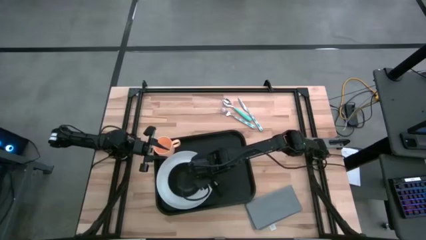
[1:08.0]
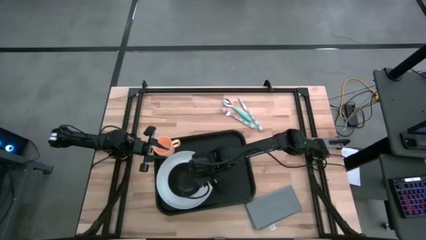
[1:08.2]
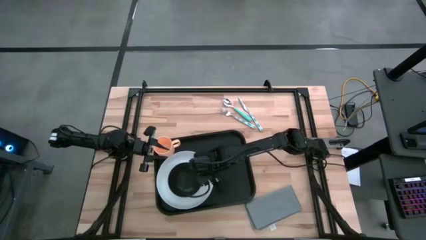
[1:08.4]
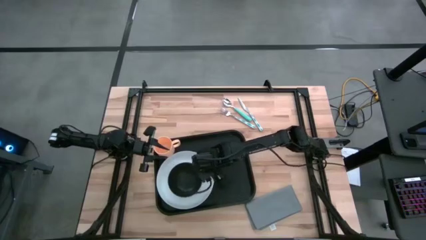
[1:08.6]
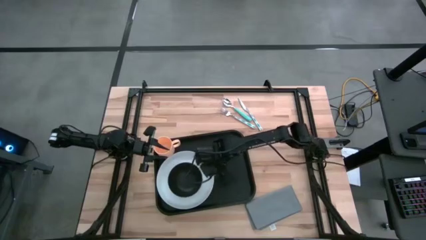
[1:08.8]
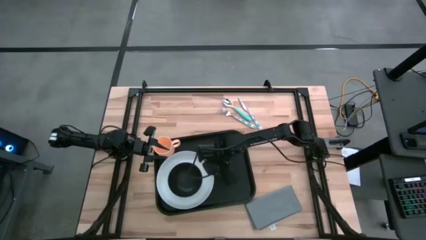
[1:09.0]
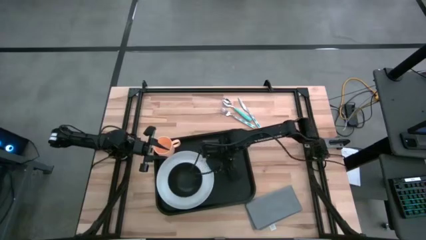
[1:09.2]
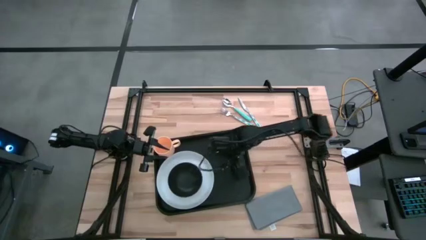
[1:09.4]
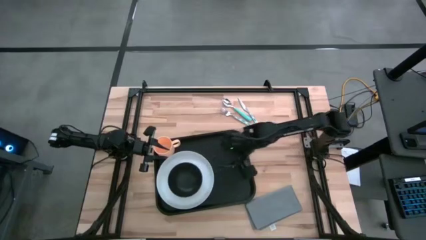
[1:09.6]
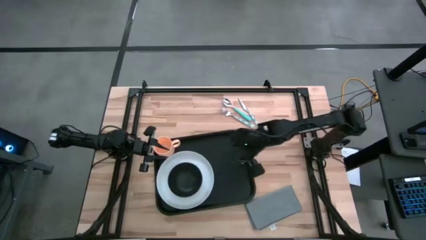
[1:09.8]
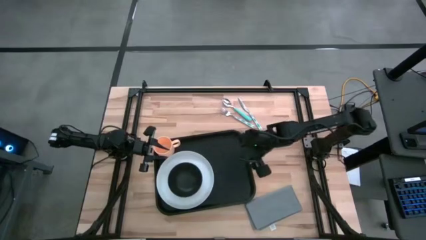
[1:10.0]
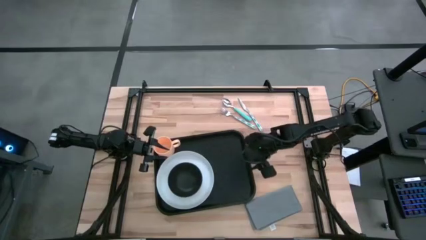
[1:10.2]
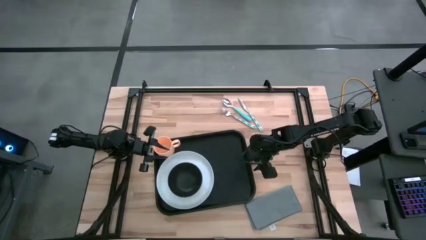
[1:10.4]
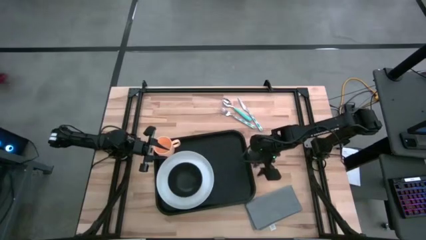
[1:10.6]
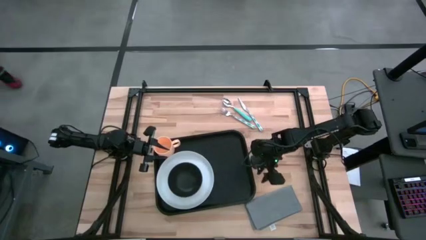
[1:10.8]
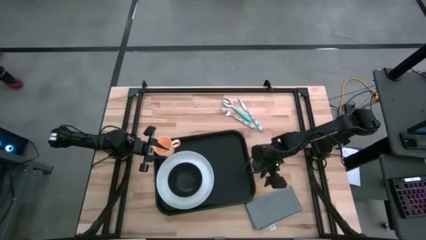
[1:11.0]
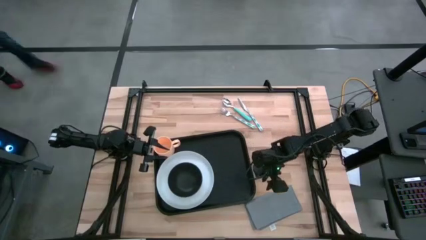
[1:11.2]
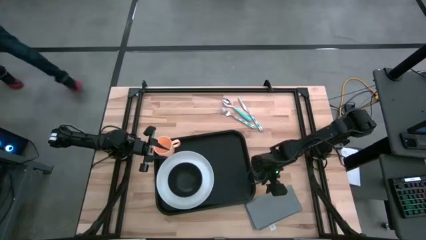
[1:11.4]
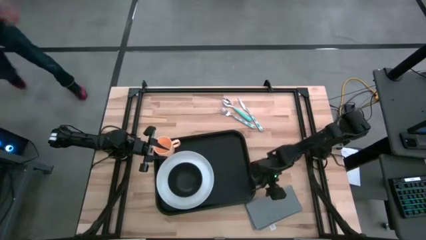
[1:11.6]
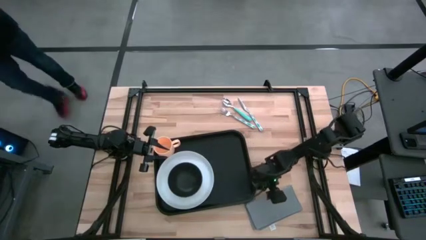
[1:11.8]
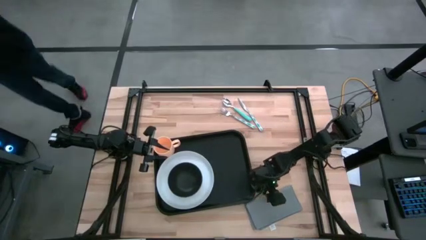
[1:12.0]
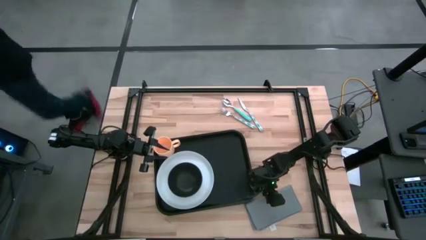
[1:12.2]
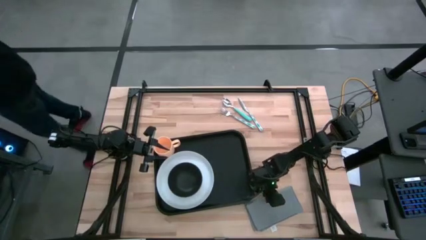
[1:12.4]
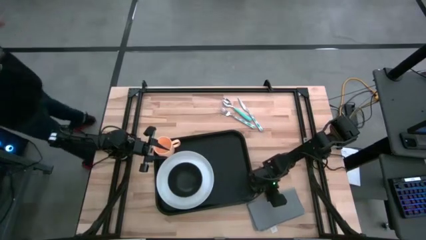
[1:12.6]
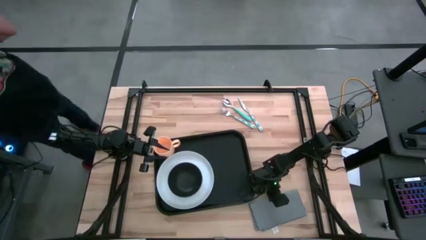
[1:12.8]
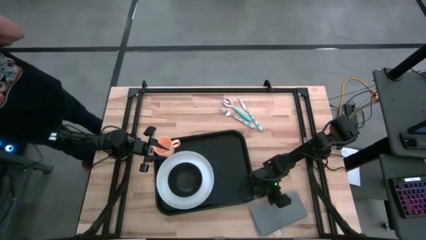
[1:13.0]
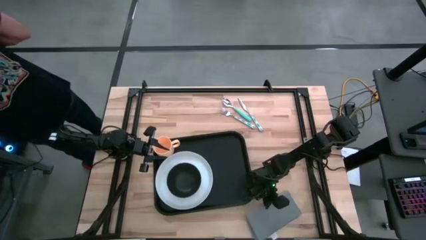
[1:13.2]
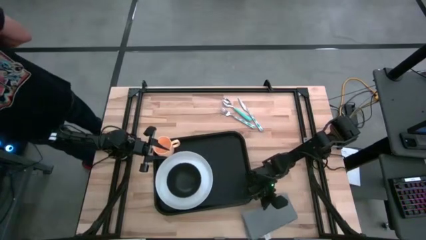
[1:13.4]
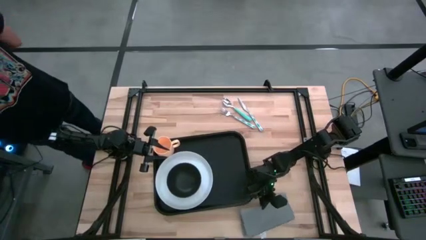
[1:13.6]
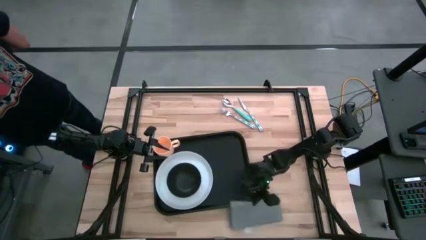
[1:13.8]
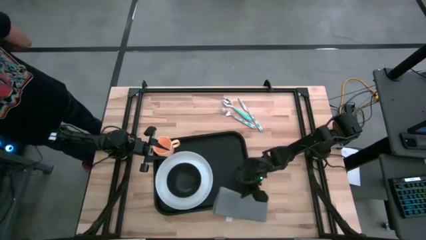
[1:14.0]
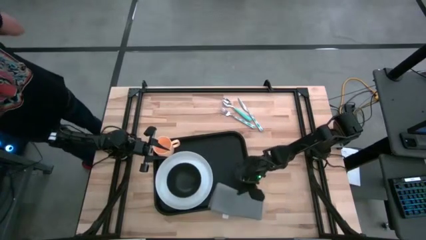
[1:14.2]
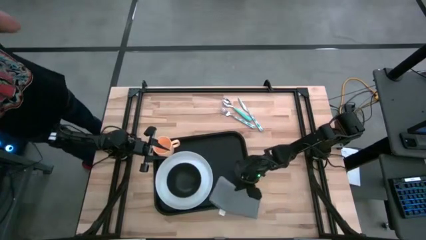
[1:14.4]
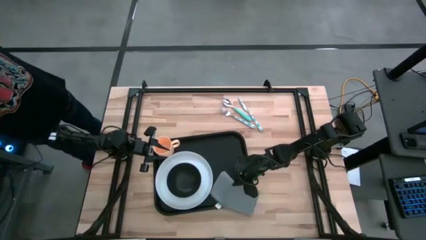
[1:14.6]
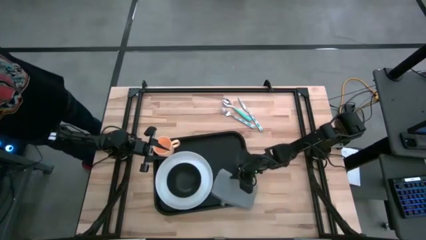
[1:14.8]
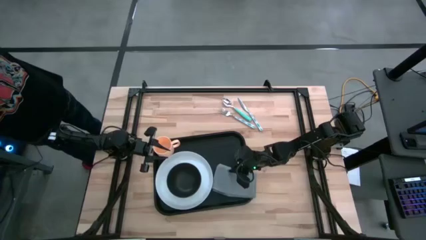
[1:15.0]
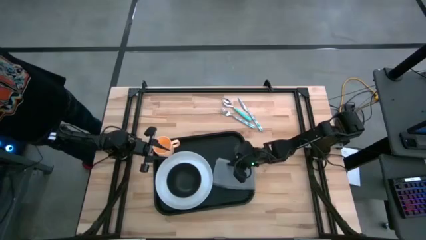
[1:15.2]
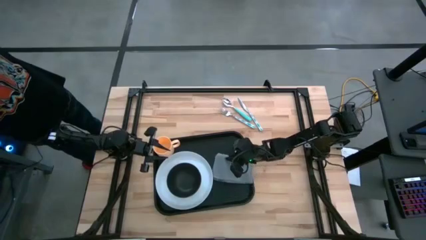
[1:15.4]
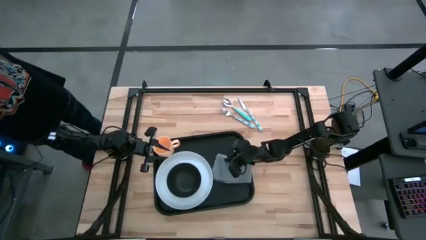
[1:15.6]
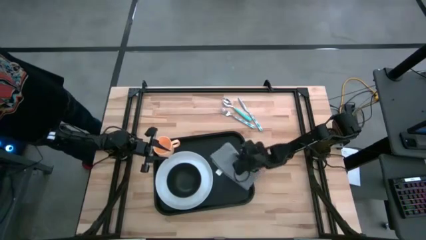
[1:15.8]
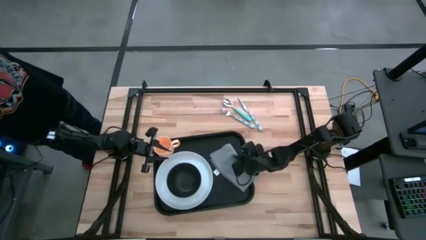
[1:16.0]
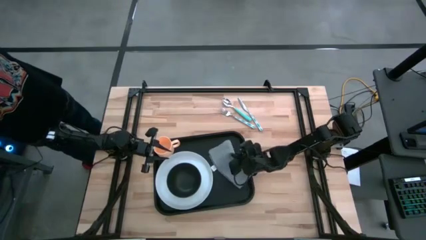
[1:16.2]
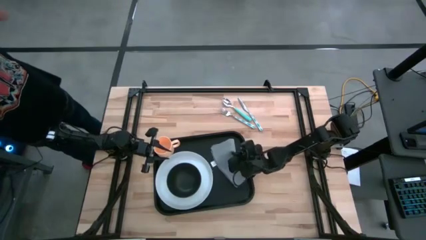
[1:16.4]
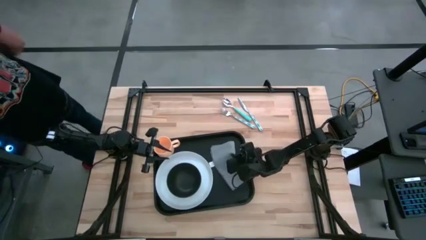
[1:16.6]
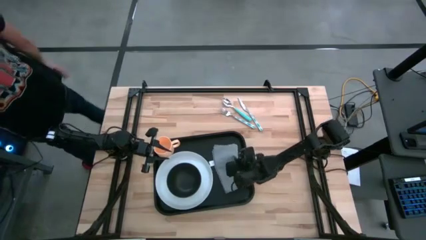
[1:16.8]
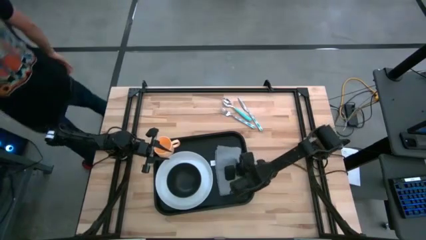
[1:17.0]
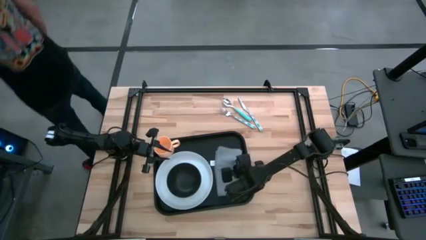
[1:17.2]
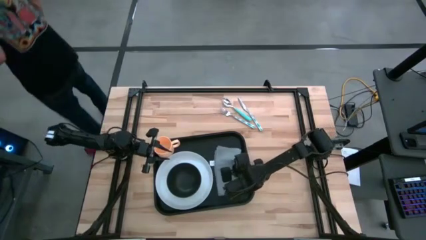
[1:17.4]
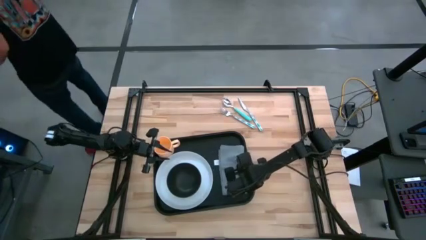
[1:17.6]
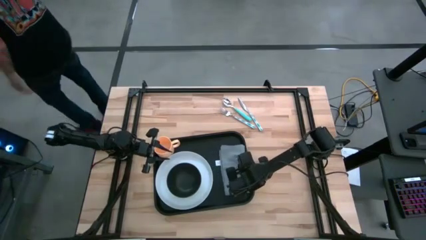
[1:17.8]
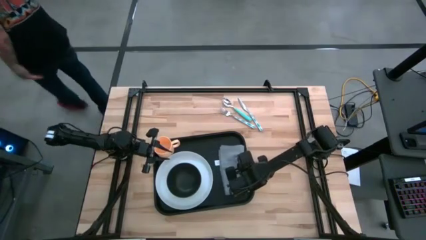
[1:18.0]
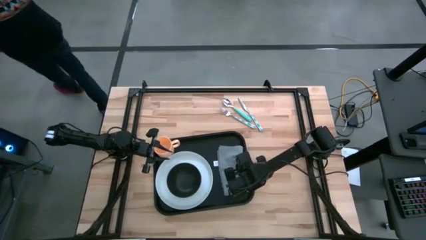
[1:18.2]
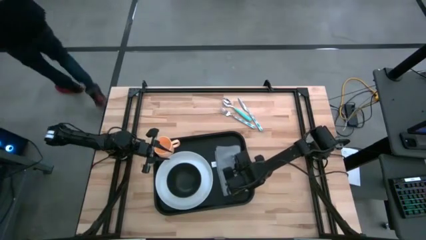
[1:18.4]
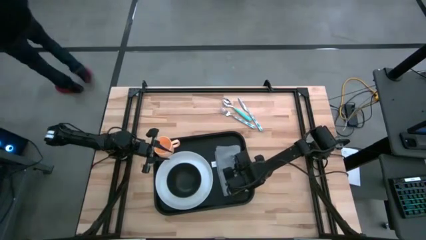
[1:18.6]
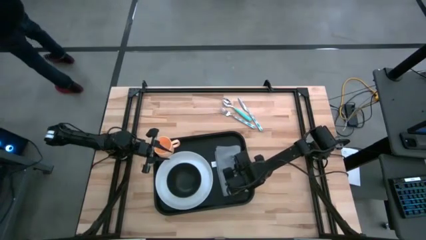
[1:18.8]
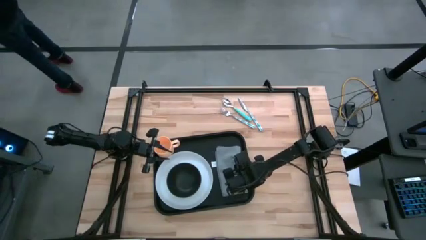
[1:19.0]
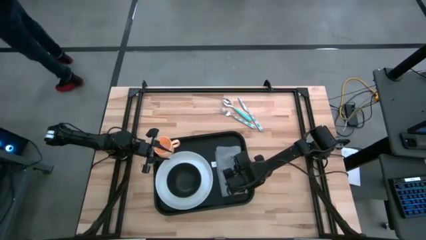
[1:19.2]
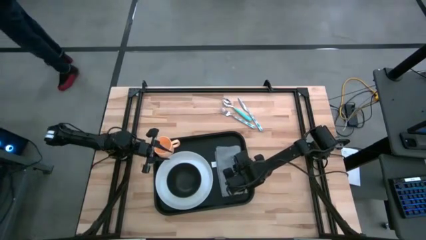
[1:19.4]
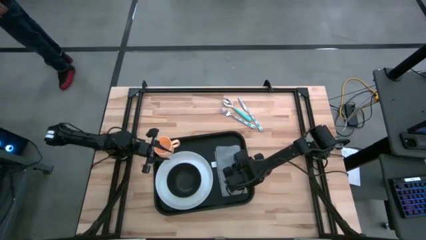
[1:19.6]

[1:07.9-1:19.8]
Task: Set up tray
Put the gray napkin on the black tray to the right of the white plate

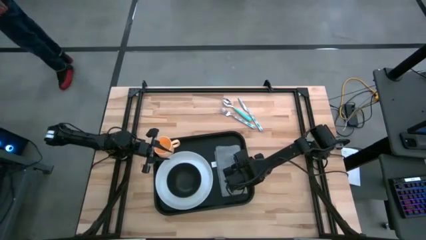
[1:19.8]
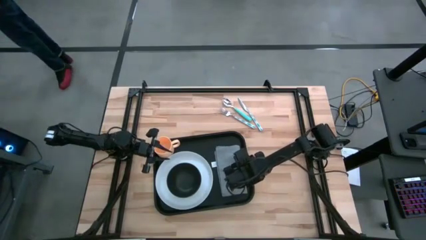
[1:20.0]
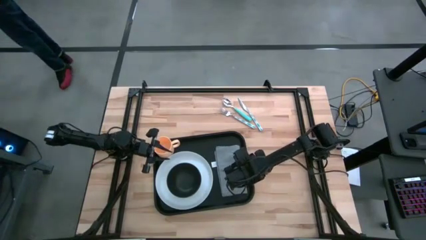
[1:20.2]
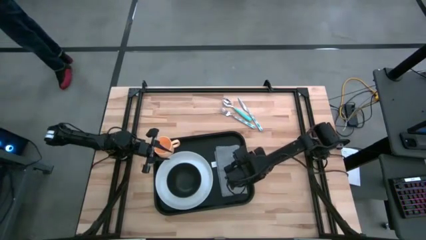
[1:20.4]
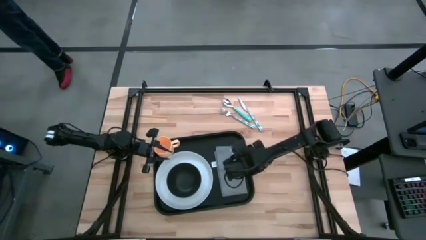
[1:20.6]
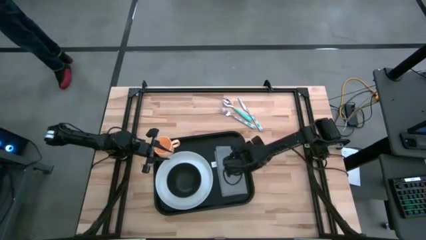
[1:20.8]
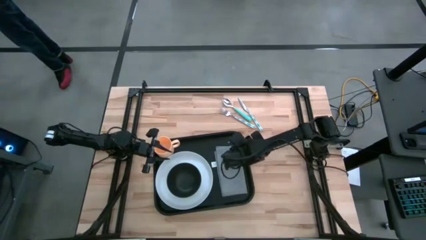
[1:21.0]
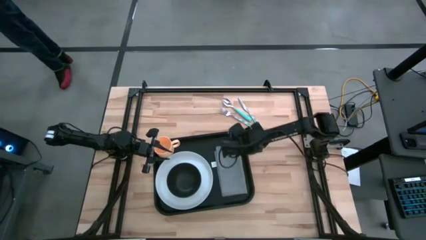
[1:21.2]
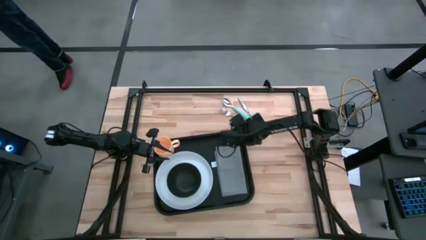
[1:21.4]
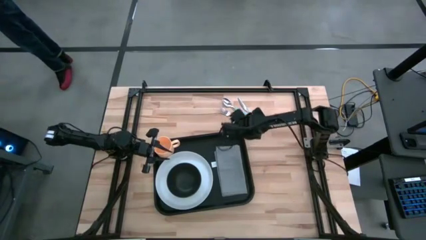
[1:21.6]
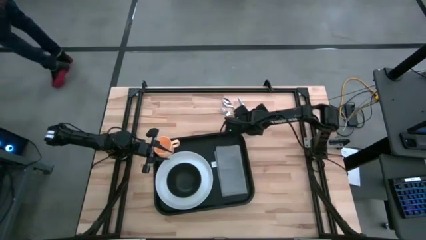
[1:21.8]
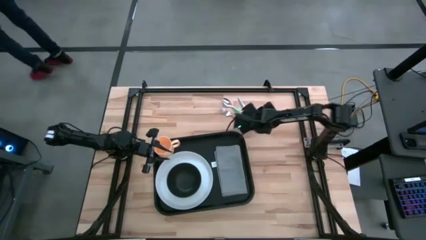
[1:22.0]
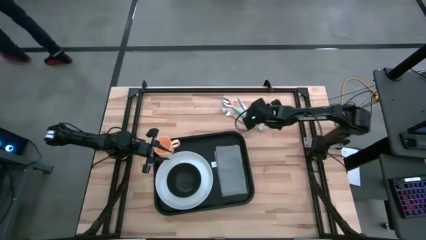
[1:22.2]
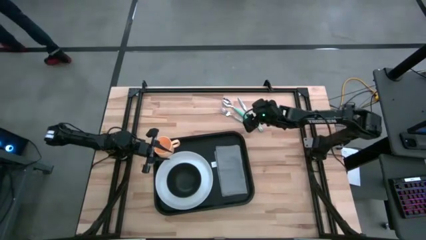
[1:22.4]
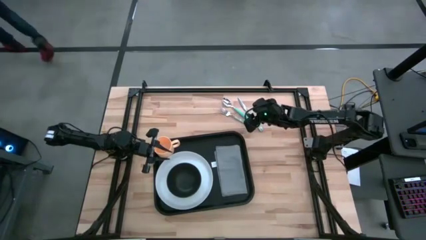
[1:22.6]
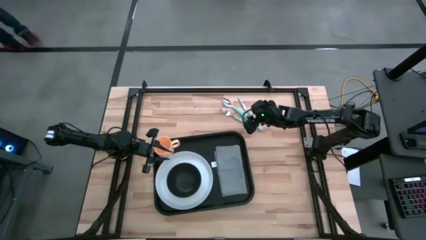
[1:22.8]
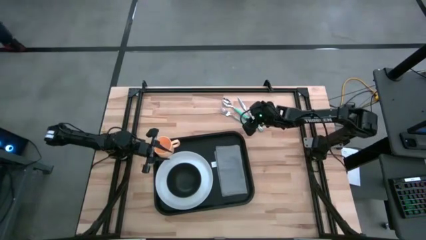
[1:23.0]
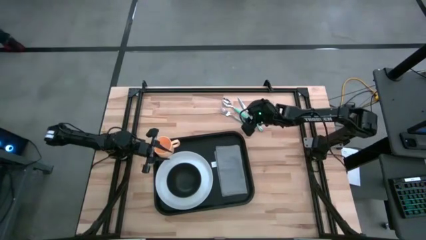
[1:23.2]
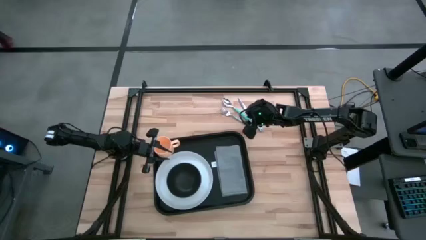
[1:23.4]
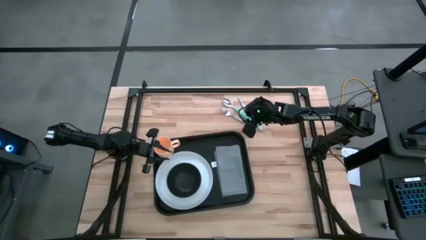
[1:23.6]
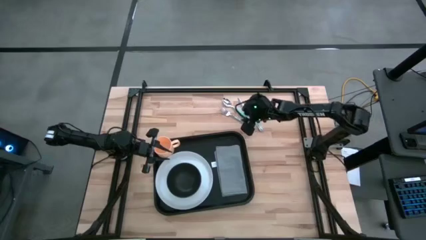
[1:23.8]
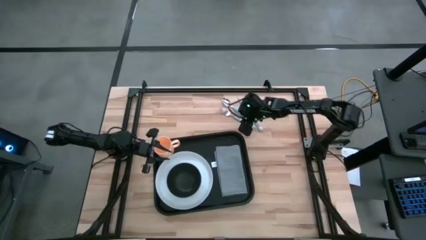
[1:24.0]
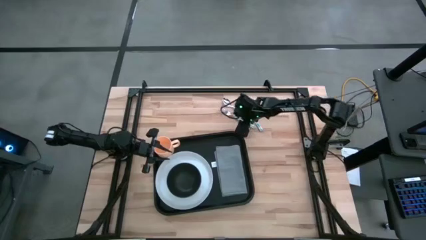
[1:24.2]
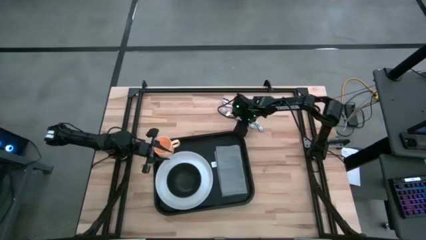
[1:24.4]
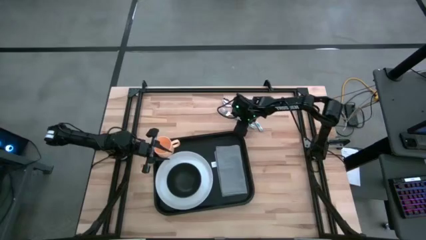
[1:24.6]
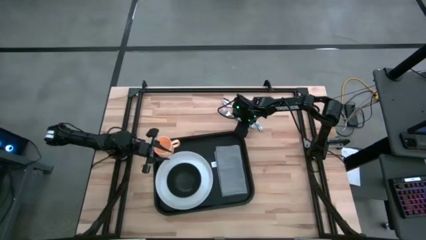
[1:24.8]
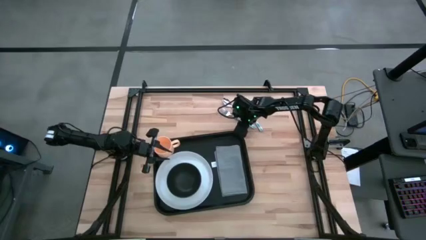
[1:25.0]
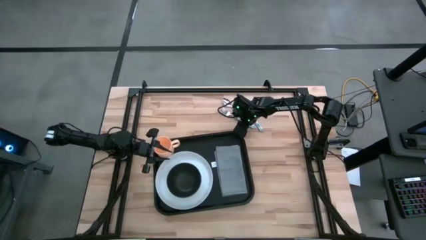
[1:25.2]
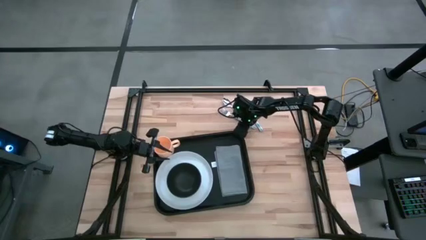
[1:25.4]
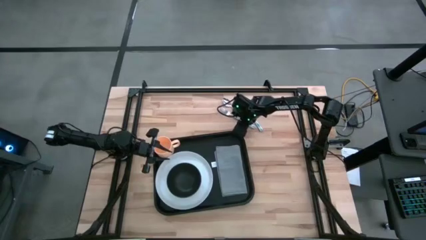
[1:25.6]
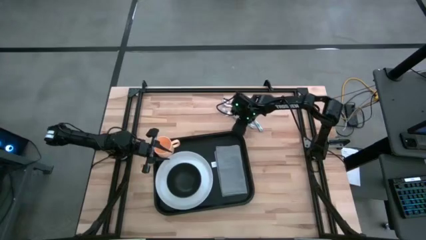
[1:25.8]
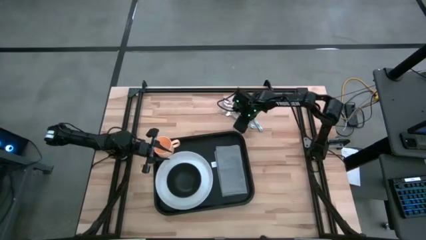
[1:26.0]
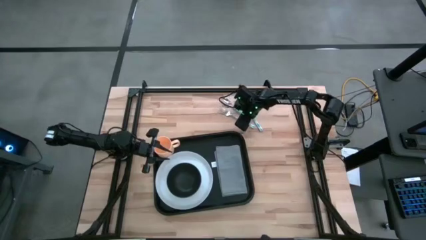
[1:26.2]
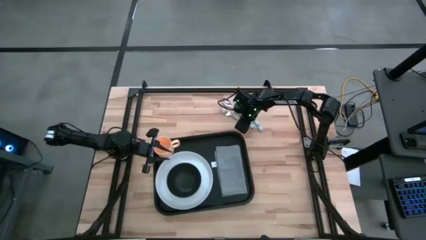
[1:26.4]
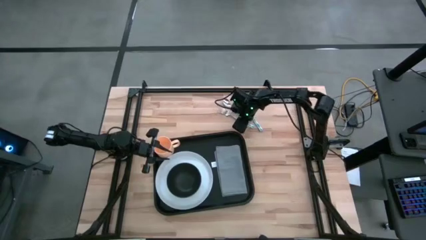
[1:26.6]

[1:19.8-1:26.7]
Put the green patterned fork on the gray napkin
